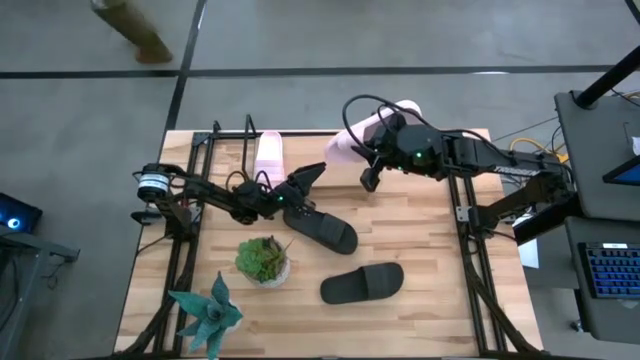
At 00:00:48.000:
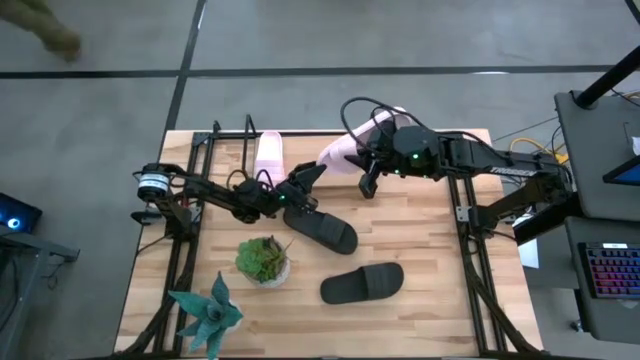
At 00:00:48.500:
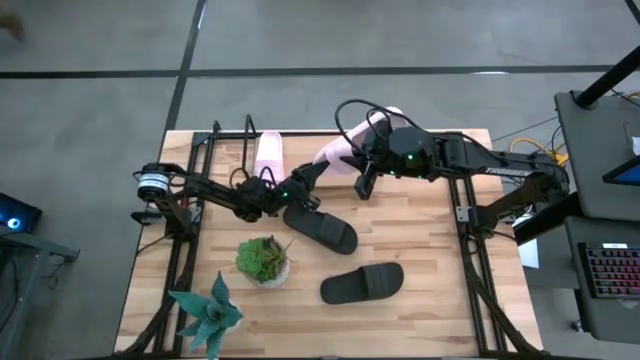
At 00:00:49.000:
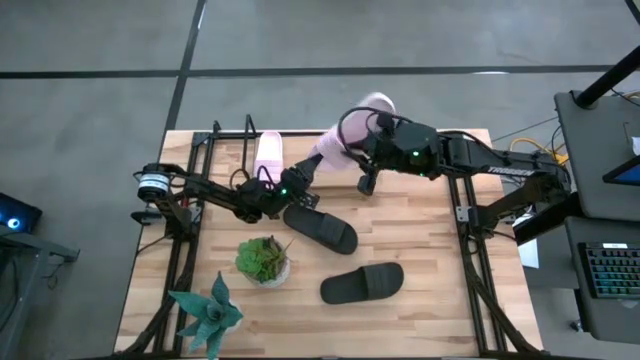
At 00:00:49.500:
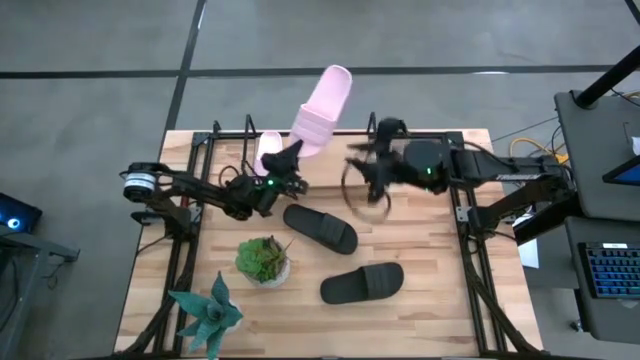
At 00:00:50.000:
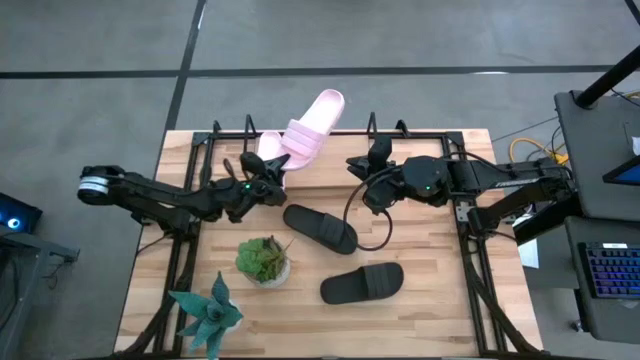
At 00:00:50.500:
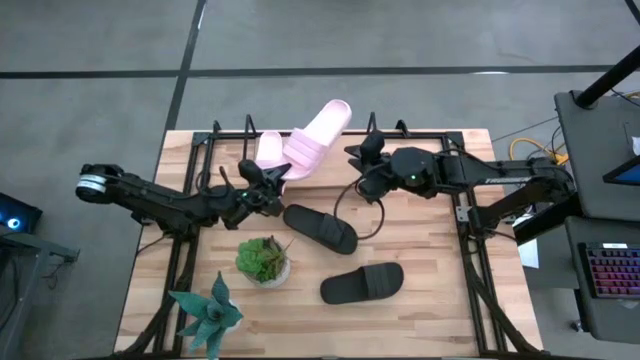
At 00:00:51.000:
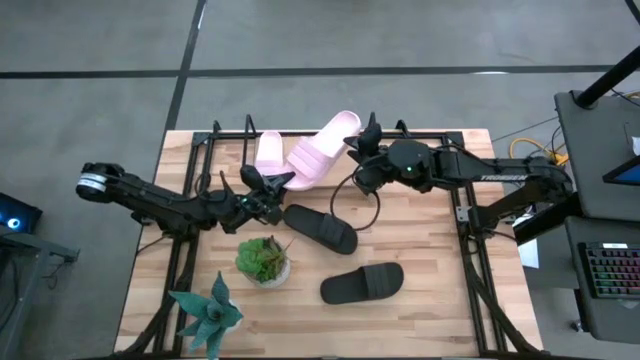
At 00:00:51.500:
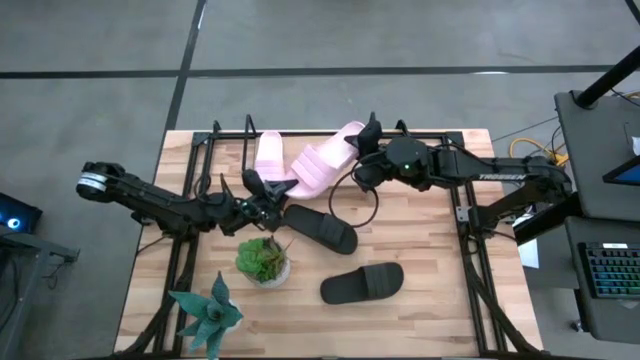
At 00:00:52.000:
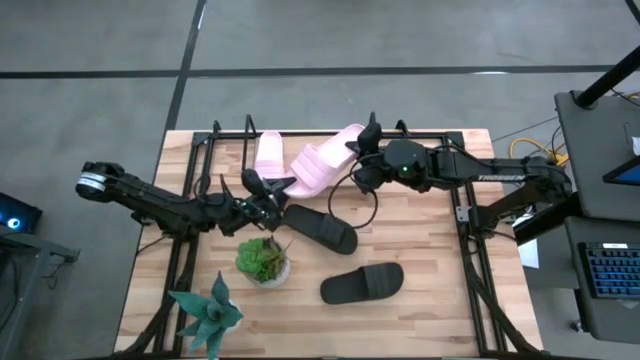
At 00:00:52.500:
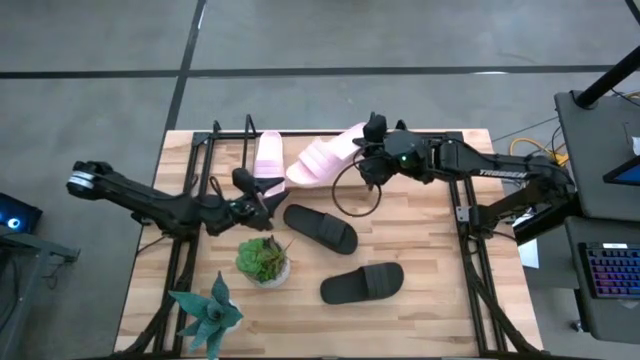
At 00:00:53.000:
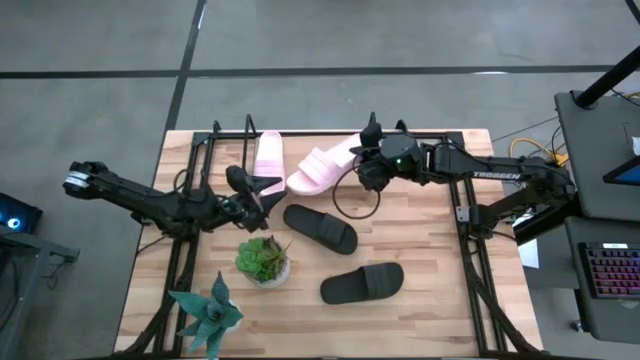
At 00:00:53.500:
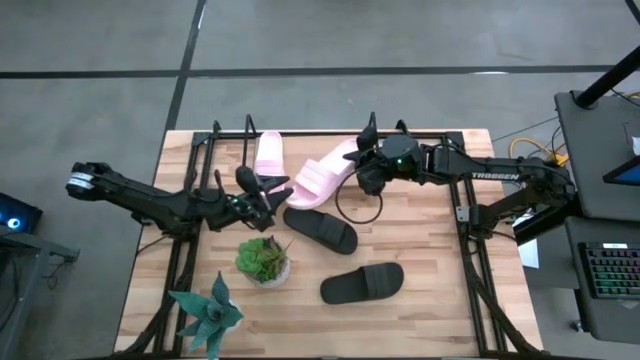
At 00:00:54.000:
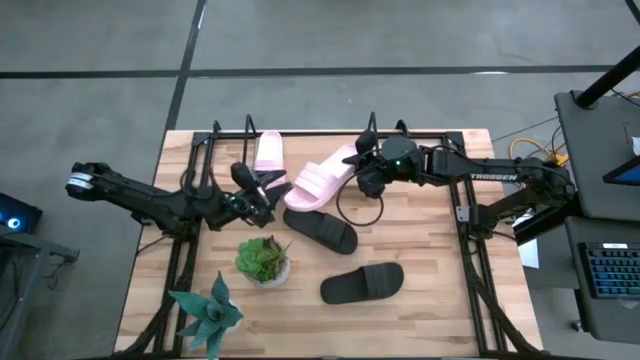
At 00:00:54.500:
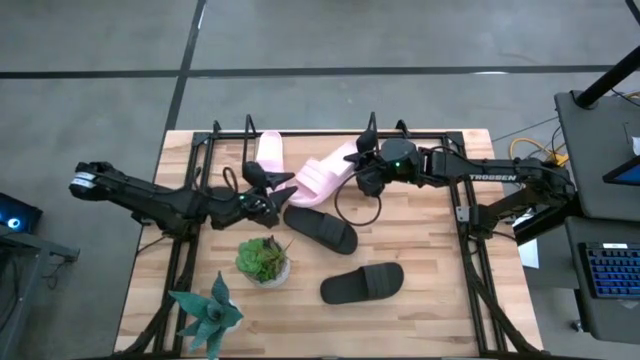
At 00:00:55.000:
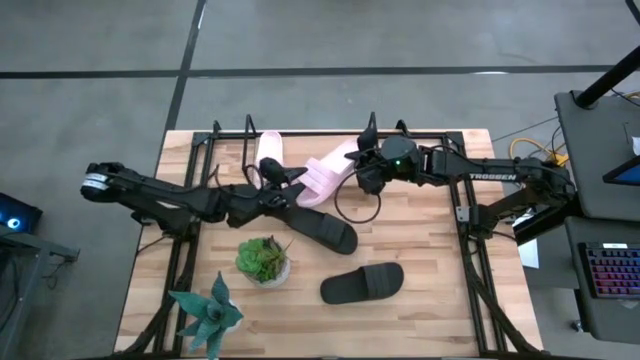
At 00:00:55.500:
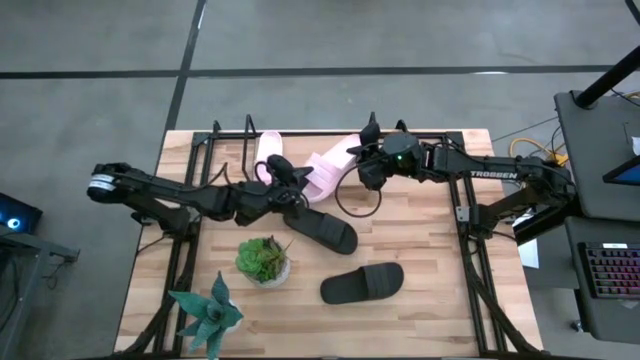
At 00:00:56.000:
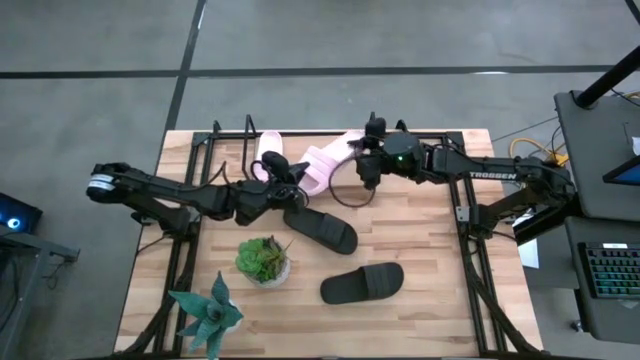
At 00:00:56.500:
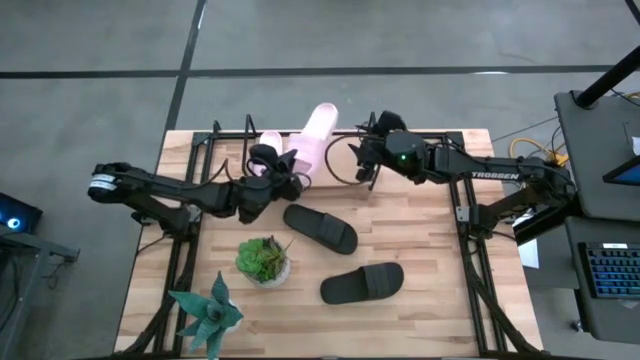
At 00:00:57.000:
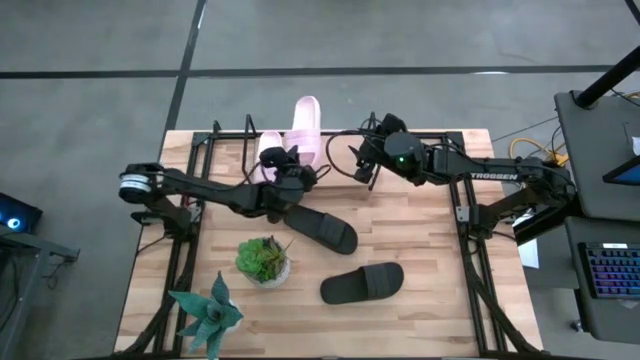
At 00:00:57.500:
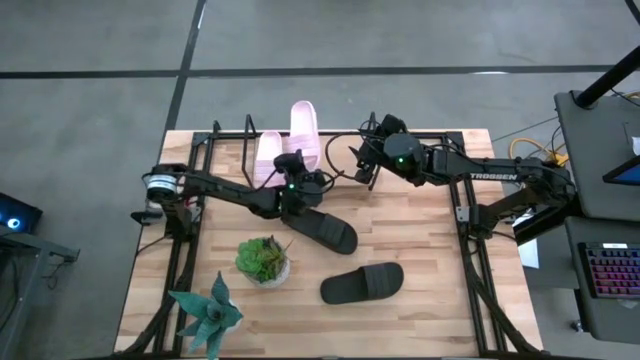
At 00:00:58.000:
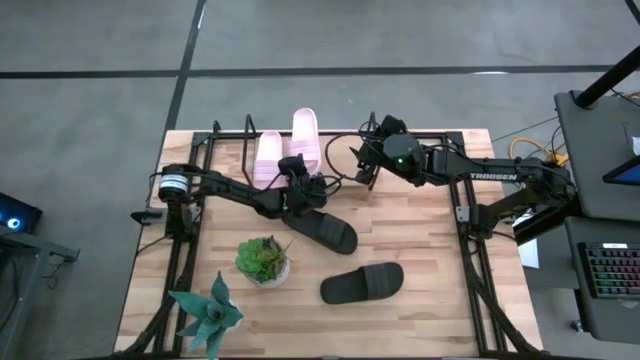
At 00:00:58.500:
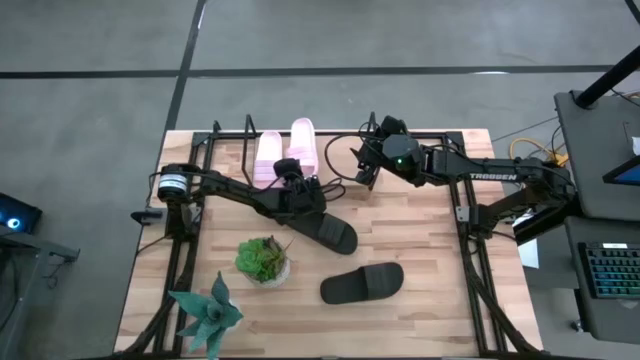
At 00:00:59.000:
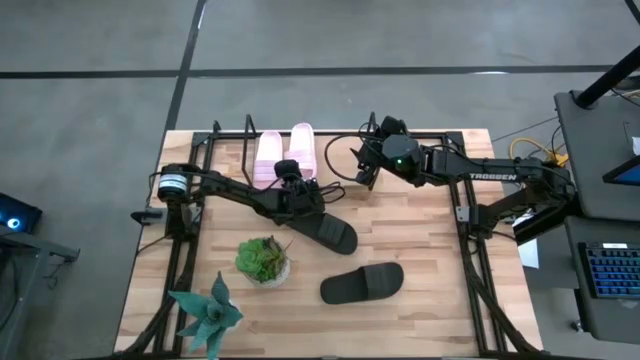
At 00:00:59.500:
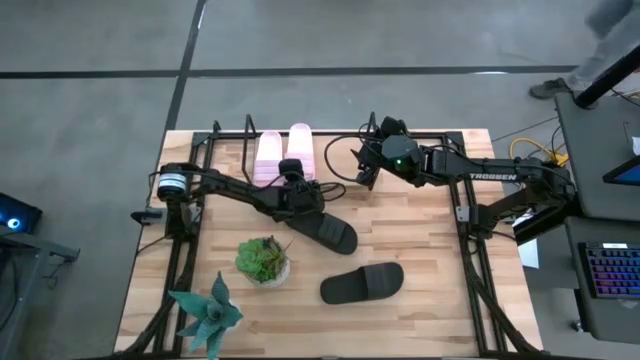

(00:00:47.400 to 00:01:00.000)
Task: Pick and place slides into the shelf
Put the bottom pink slide on the shelf
